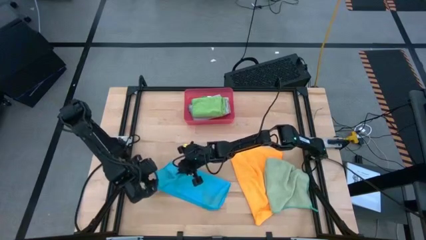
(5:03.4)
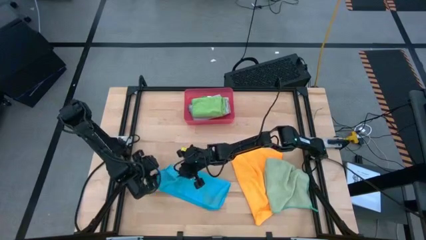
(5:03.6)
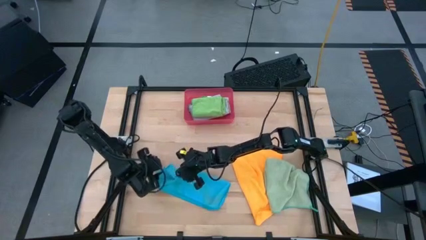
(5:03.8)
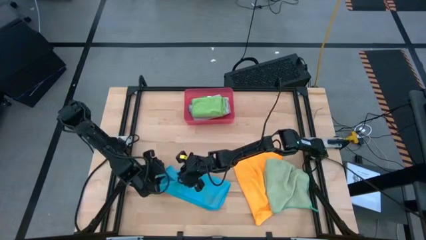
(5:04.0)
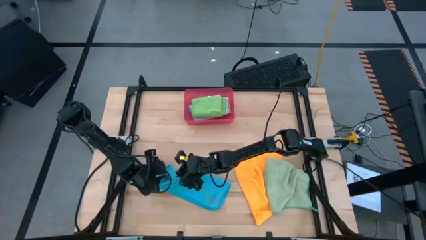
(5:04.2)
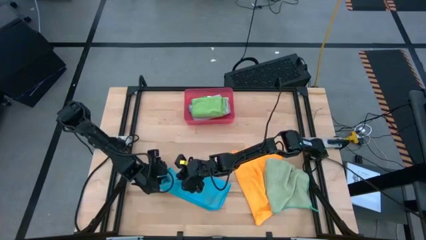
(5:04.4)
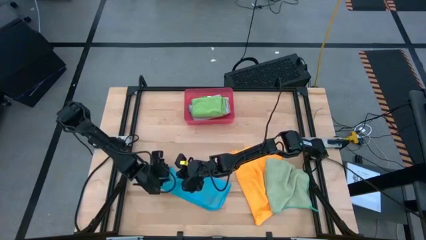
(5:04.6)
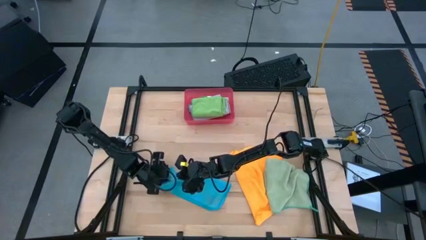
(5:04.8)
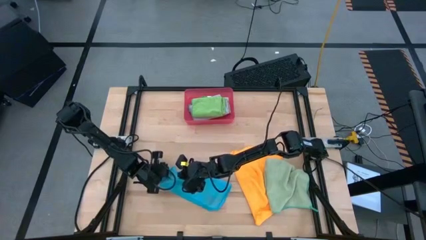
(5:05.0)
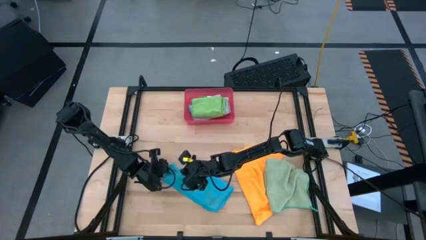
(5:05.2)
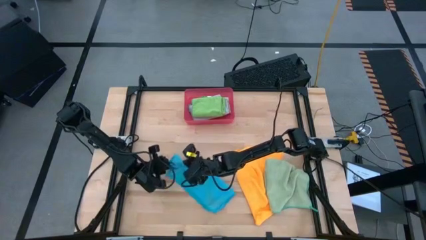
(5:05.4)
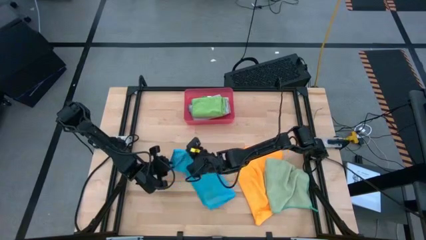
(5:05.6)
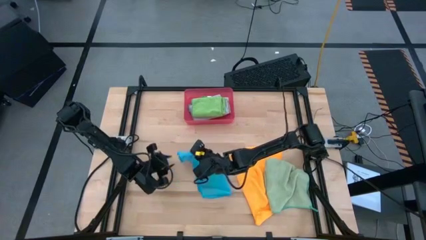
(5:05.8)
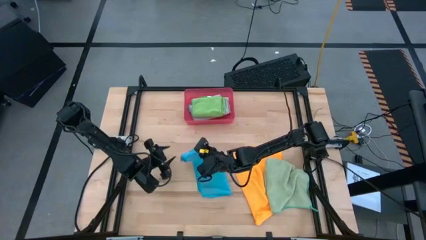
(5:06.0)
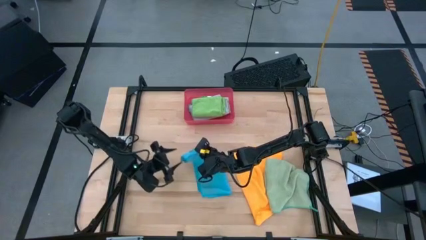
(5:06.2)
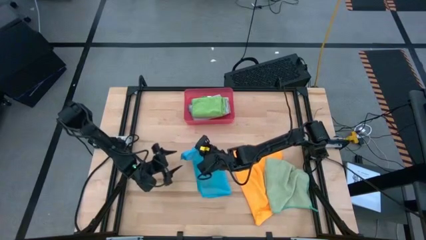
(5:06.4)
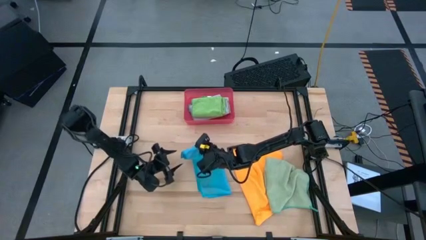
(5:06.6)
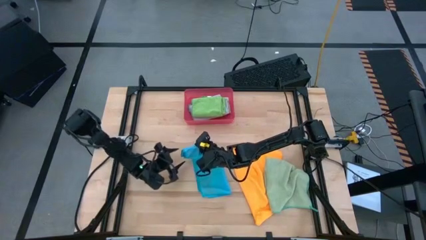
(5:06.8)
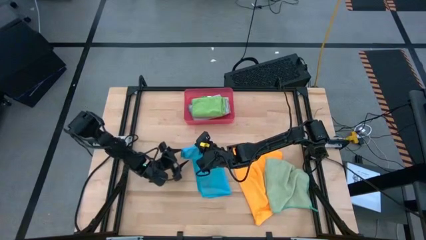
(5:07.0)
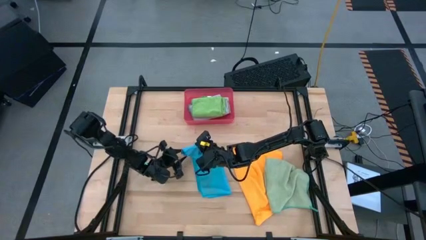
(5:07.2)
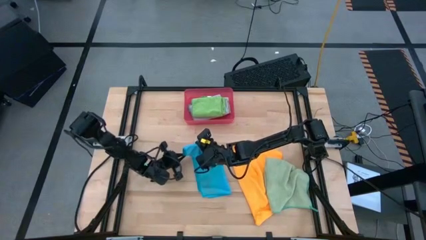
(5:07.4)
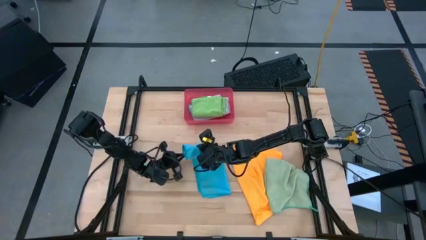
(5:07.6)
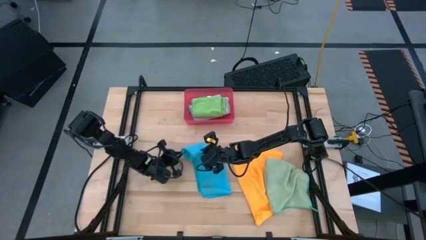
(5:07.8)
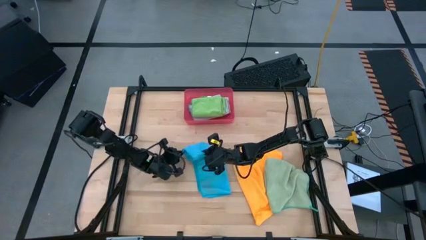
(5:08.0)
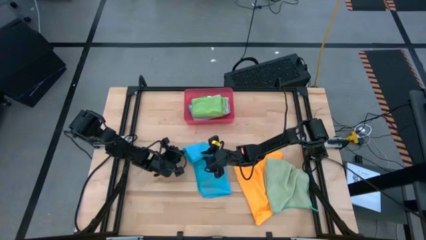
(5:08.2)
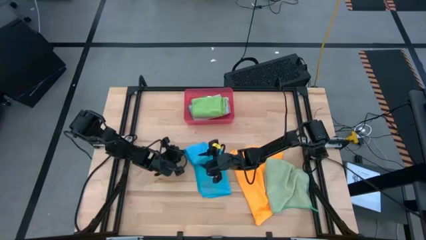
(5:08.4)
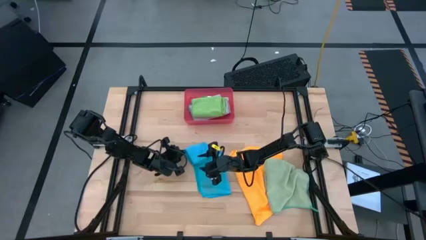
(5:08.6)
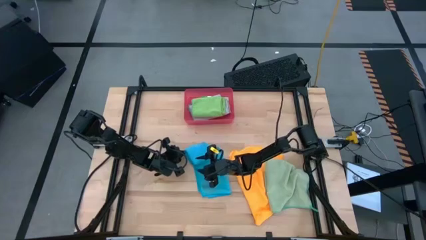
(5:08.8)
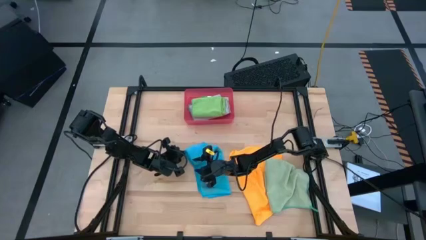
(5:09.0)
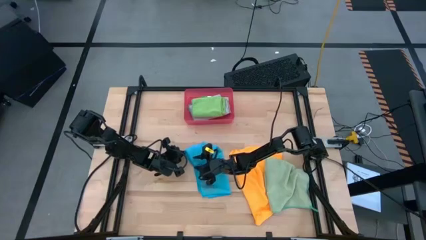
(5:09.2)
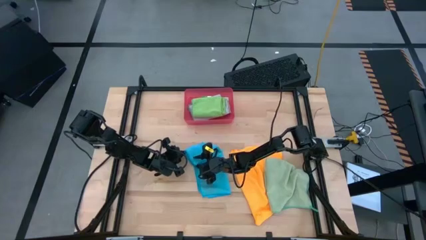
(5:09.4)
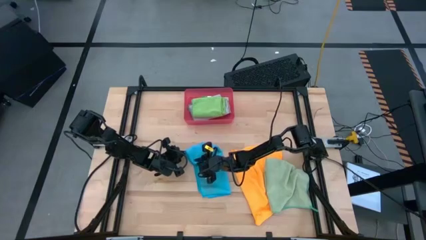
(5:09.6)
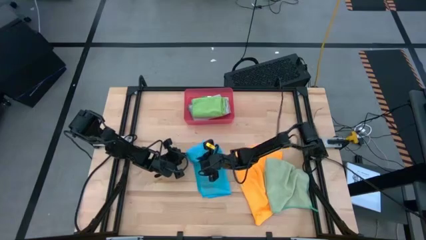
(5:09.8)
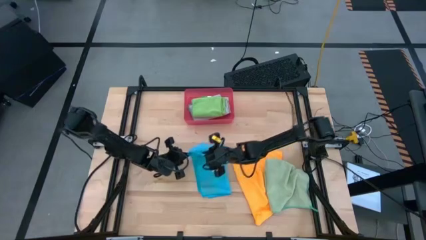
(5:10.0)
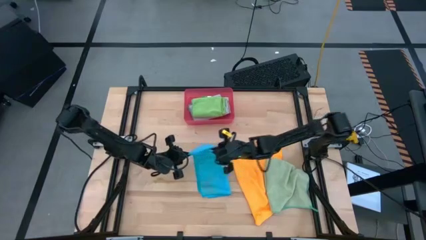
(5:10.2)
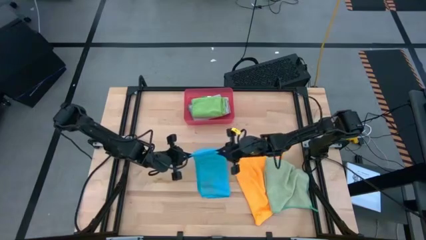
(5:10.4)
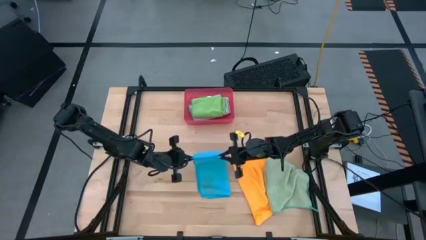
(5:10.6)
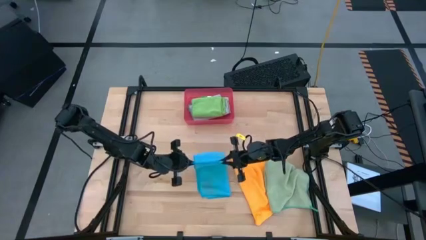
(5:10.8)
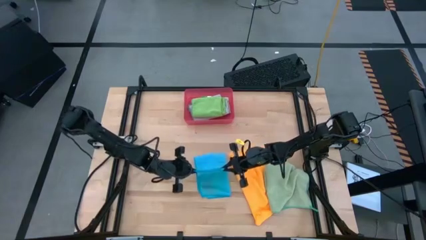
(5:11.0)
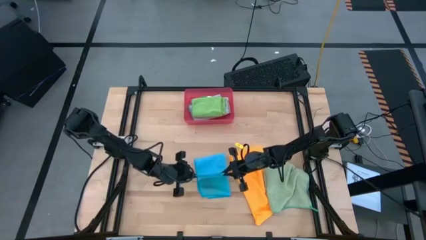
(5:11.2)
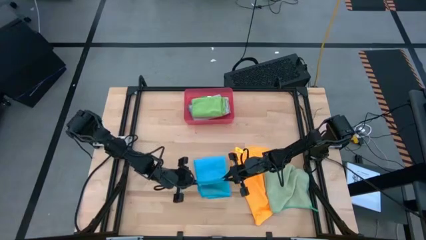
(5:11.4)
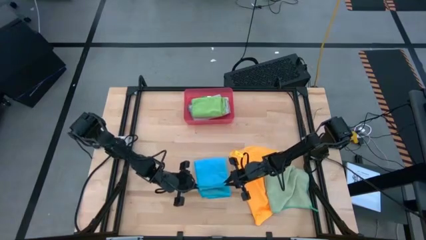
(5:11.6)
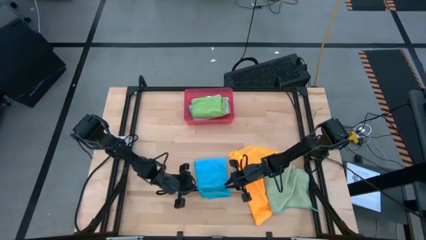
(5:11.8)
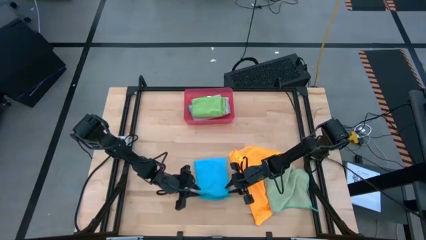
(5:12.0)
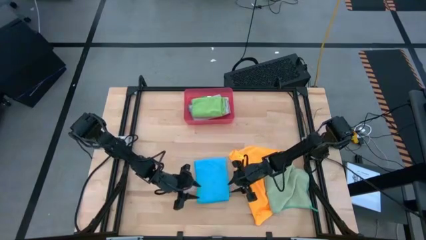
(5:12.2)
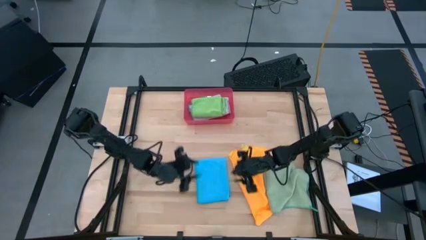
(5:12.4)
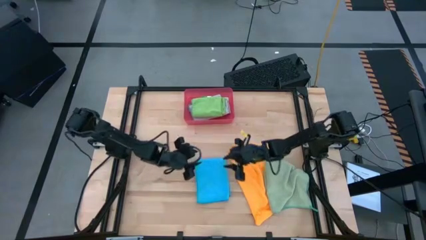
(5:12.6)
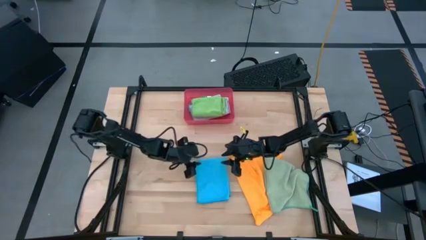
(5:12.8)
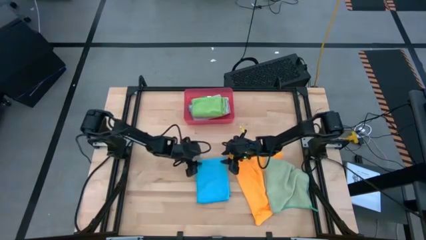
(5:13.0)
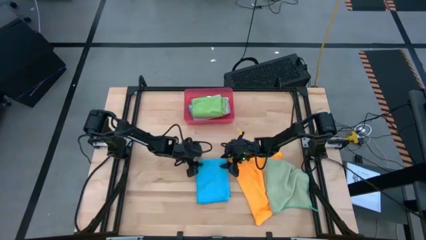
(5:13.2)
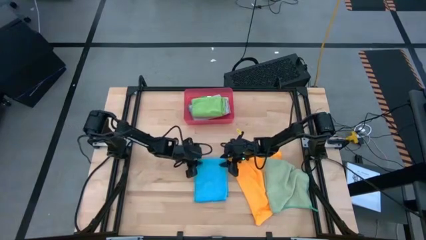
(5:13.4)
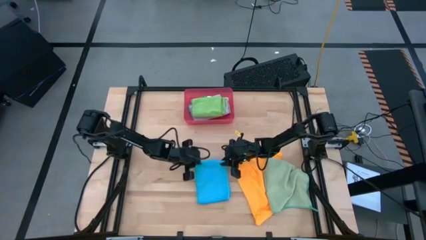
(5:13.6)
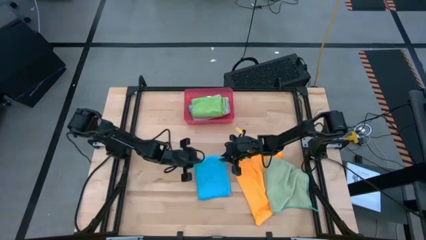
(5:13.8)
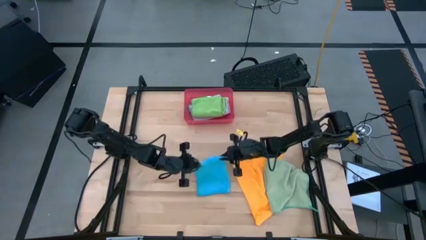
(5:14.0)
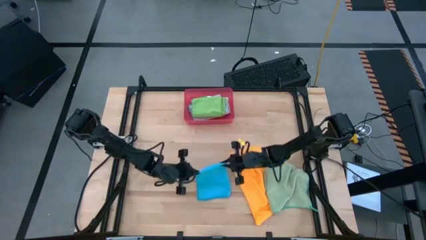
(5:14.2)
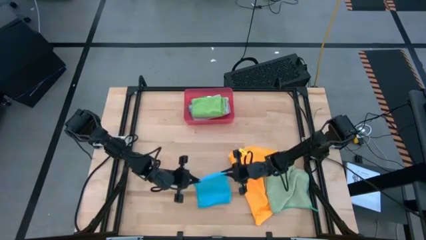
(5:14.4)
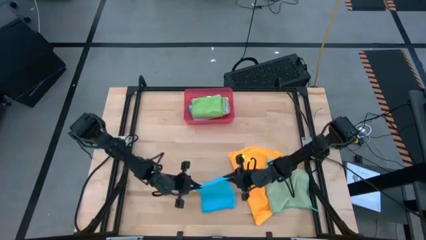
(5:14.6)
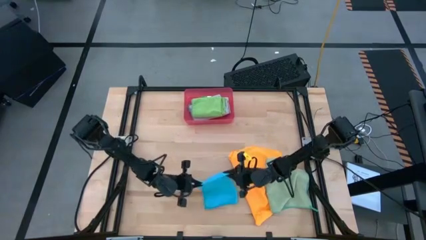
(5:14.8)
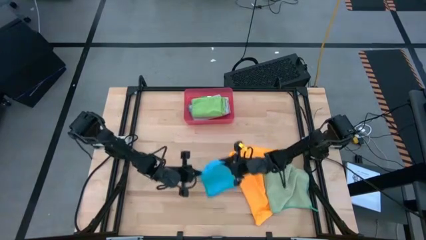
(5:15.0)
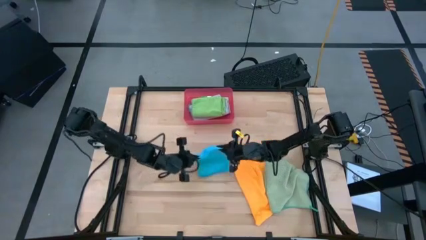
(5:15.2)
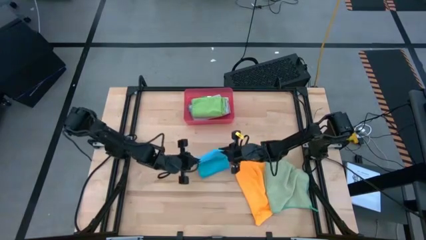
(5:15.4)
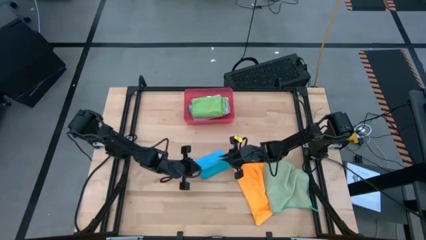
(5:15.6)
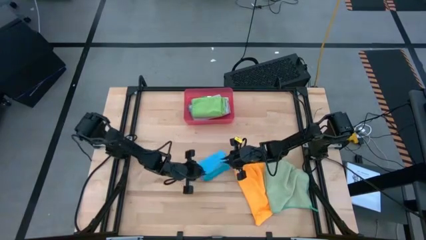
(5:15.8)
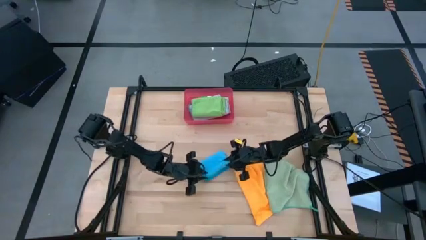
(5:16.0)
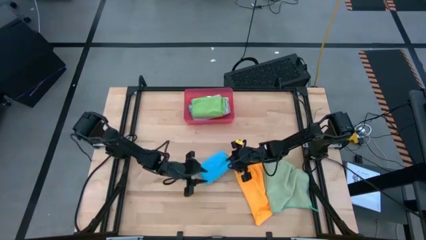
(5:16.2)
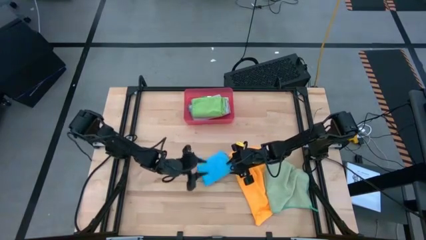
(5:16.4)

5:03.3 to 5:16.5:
Task: Fold microfiber towels
Fold the blue towel

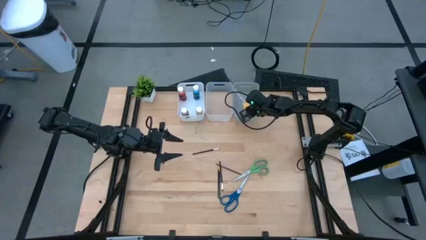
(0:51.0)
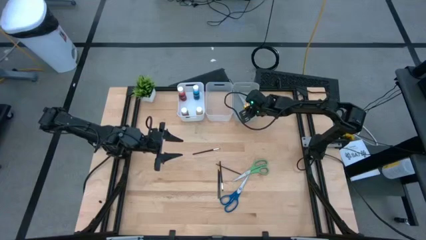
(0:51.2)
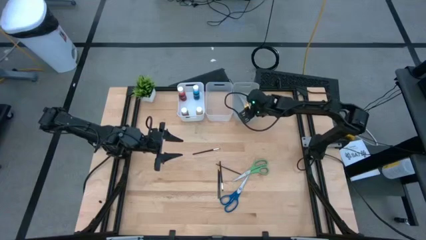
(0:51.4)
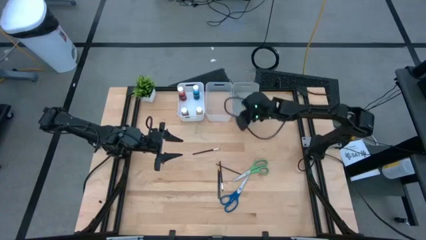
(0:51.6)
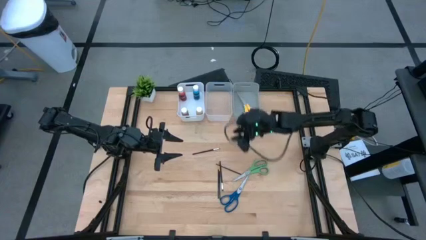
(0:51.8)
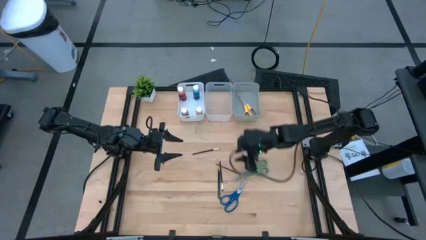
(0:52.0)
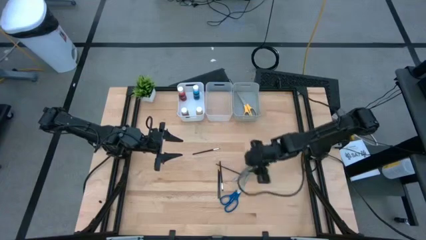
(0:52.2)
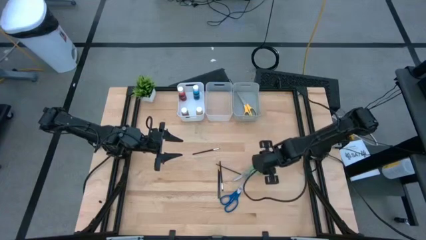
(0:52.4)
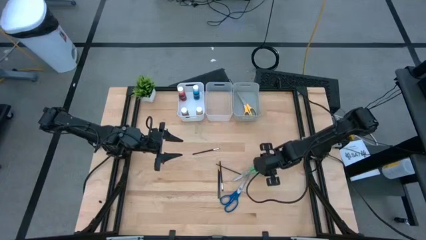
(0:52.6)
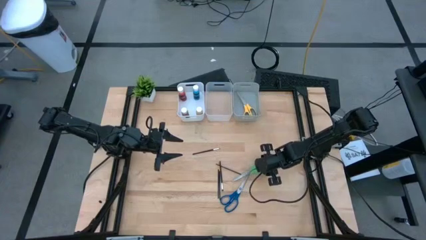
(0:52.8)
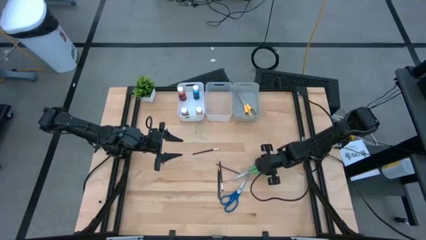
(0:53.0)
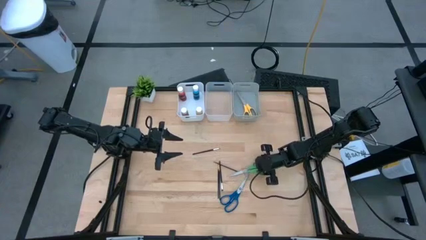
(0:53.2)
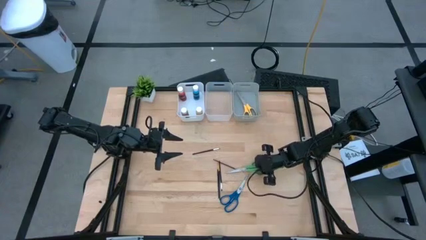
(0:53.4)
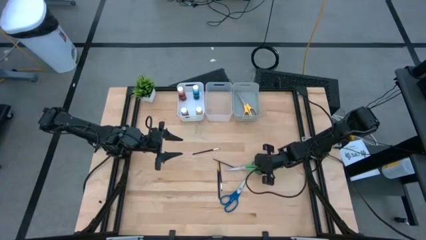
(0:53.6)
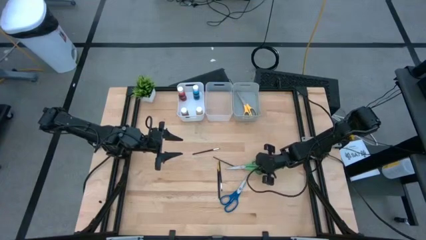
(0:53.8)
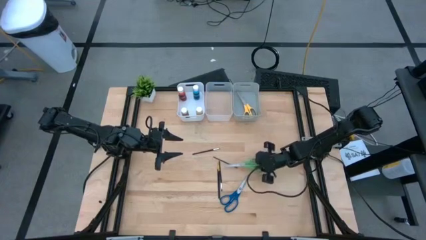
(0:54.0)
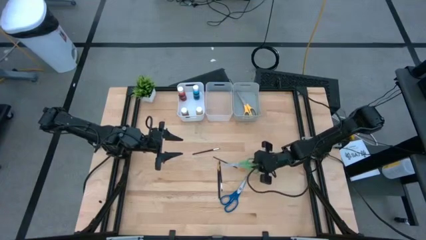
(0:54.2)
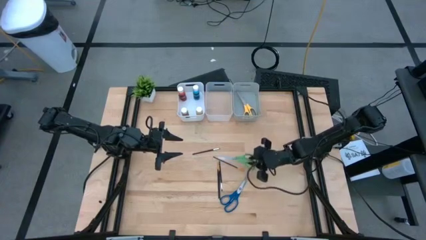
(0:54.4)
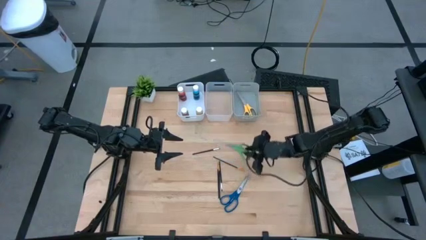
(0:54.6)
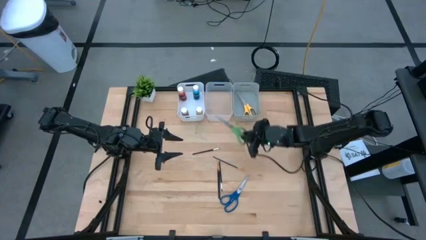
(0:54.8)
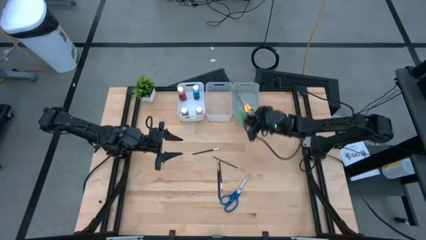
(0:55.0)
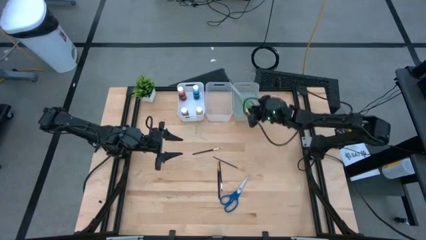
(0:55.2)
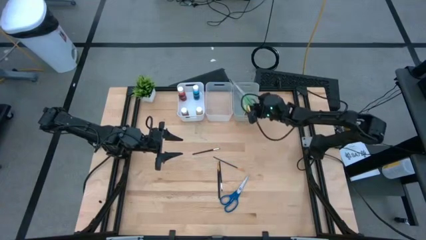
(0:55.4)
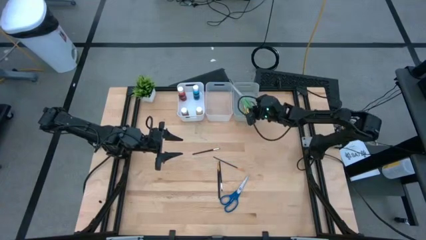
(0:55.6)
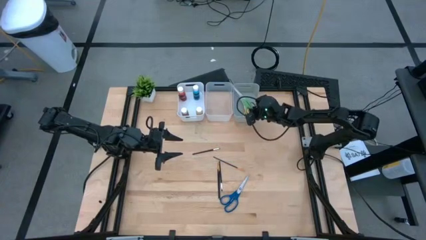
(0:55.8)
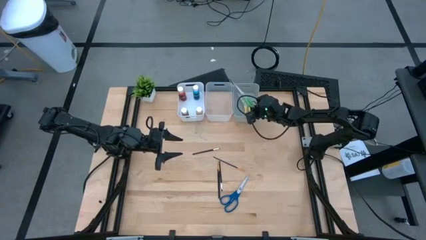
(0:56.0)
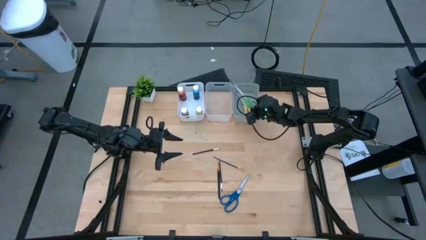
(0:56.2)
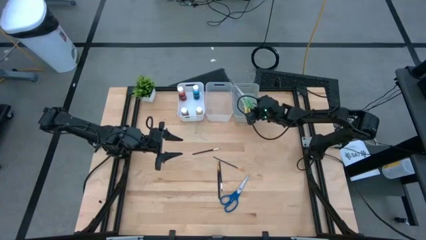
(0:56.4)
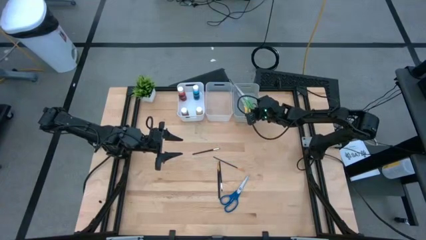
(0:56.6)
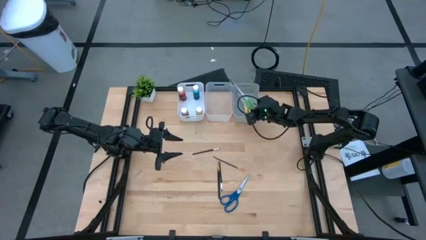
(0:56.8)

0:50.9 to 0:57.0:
Task: Pick & Place Paint Supplies
Put the green scissors into the gray bin
